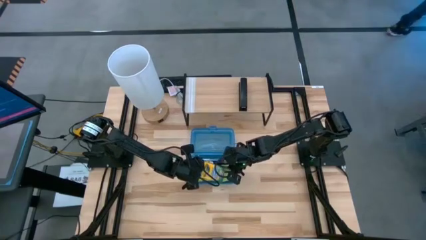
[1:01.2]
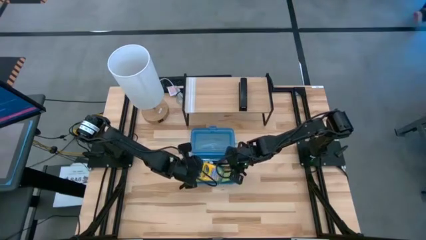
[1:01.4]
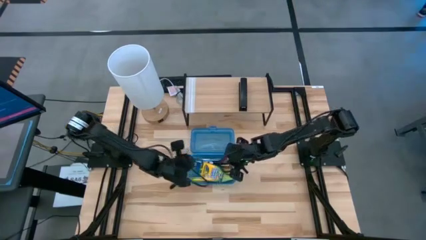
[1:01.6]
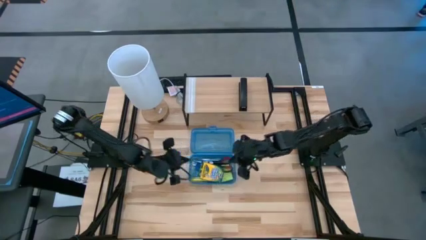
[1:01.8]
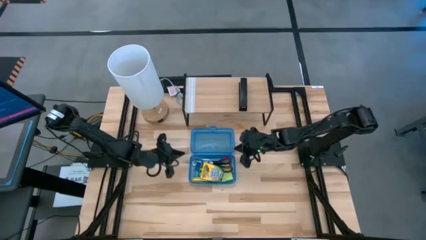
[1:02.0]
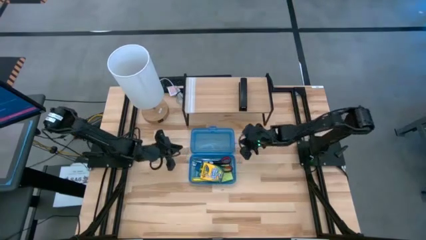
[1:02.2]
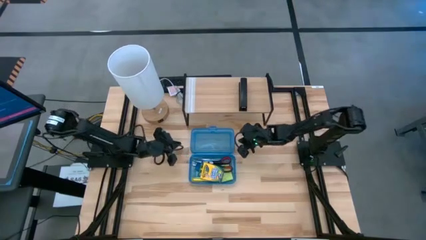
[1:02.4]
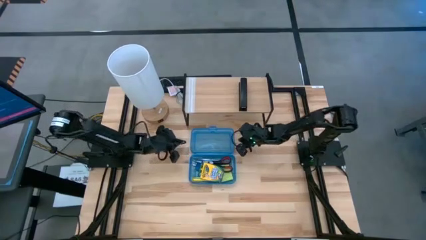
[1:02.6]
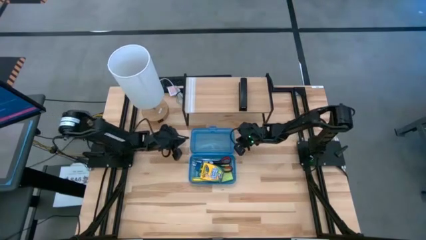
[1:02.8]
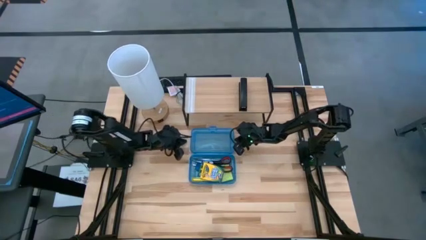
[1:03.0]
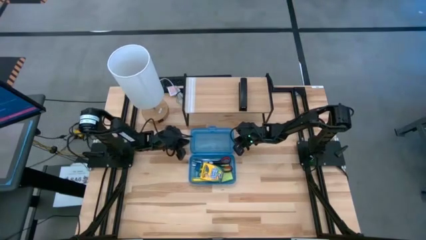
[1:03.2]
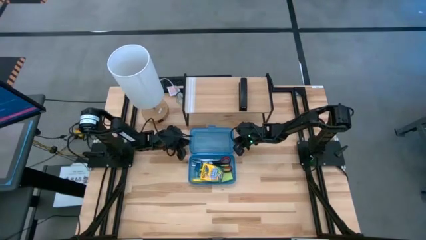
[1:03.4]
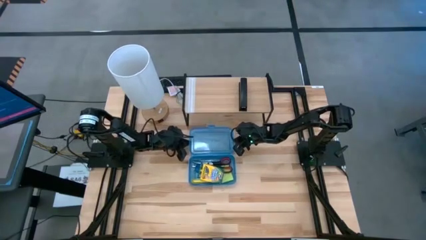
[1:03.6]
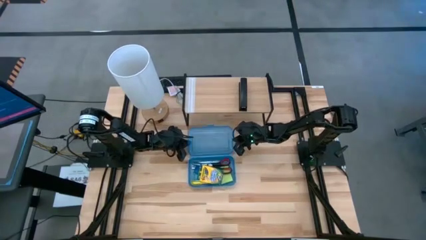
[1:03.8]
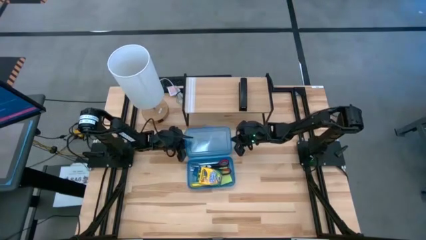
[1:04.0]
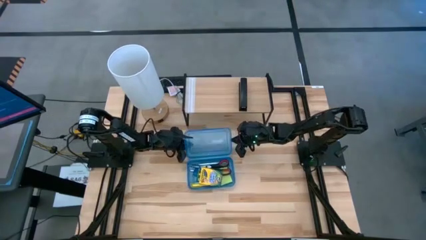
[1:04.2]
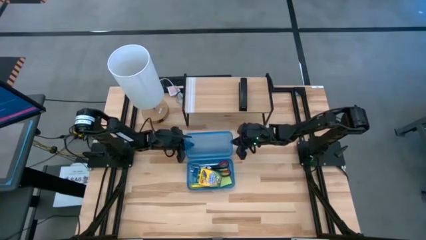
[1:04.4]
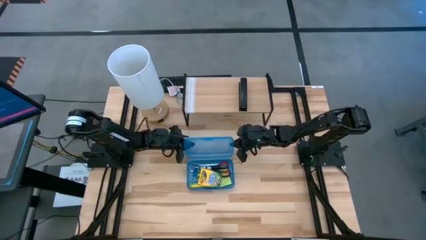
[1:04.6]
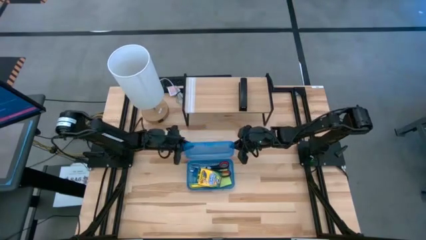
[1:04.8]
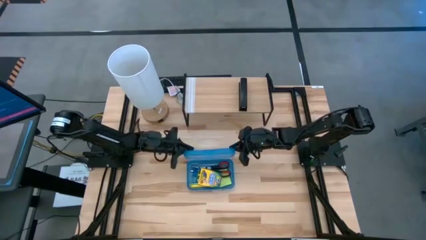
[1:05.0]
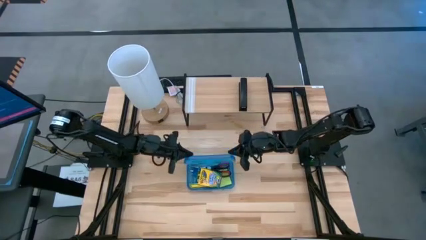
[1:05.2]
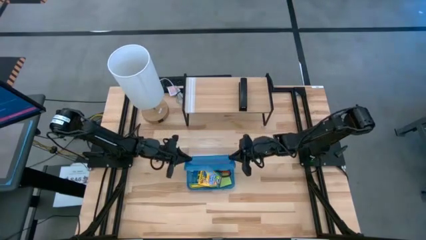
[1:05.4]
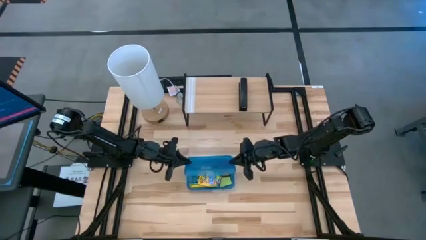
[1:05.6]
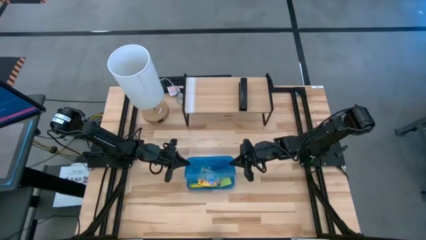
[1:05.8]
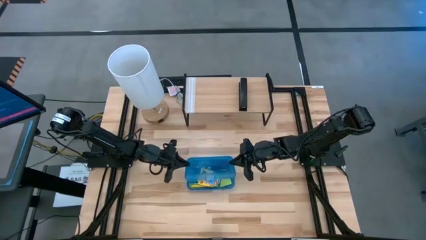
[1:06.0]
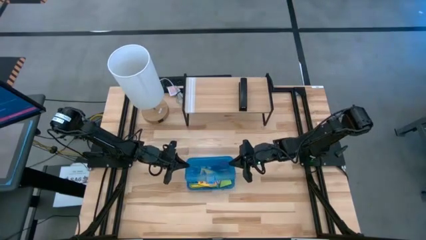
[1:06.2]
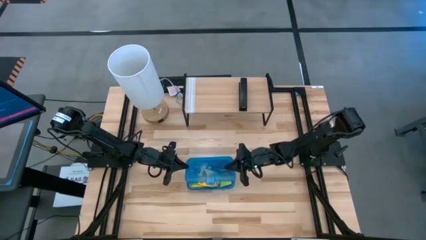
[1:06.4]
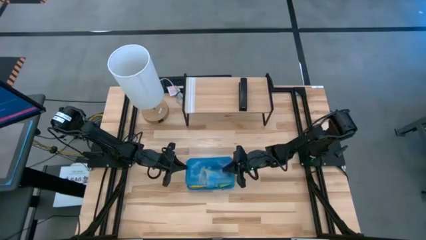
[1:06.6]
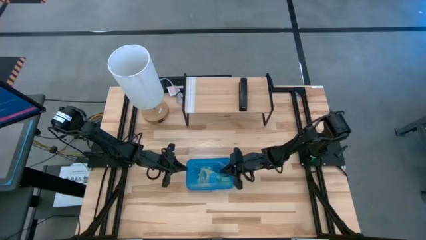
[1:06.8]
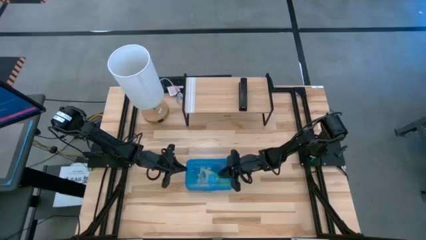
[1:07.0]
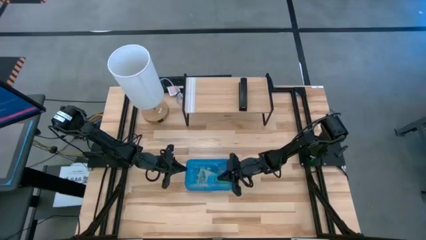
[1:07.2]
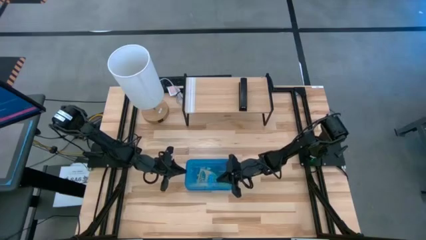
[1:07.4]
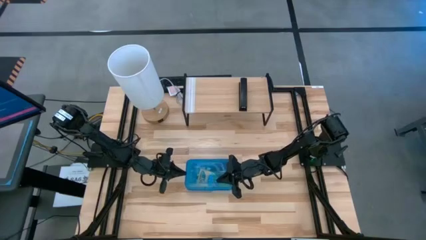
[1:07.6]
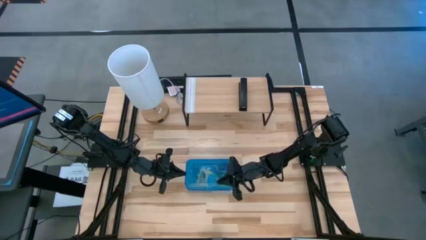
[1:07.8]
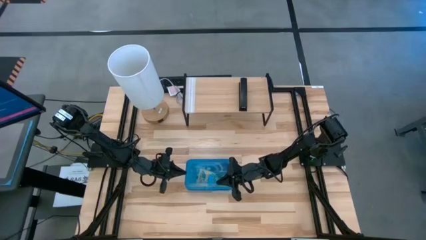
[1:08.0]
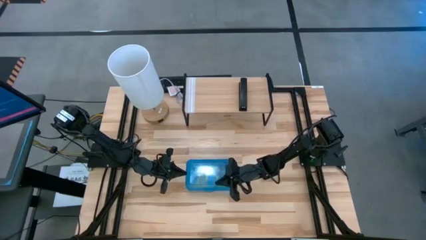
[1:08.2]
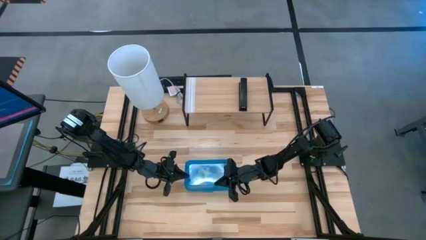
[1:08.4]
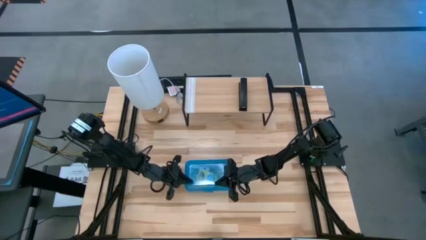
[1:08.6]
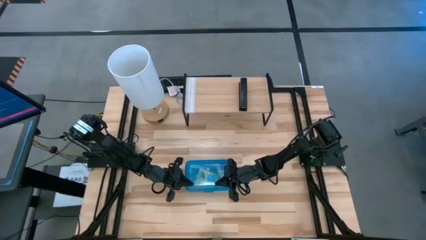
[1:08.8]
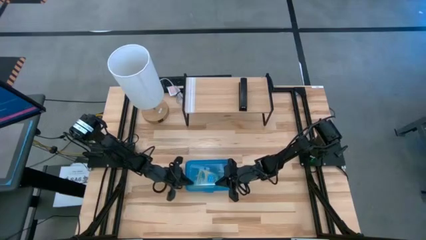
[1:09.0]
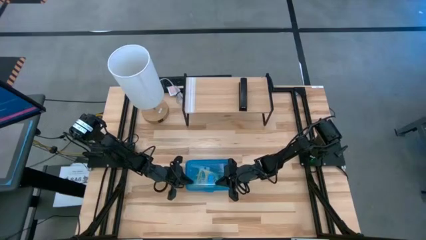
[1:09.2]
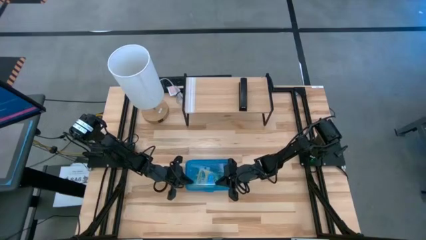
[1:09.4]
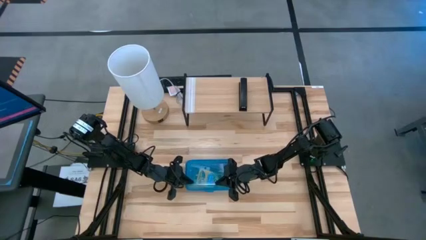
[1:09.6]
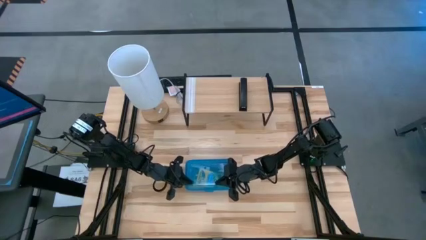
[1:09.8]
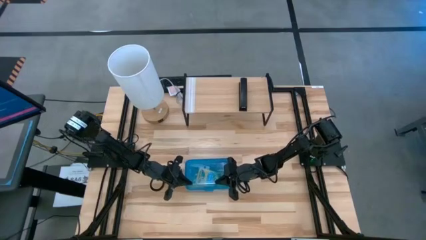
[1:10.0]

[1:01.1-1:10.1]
Task: Pack school essentials
Close the blue supply box

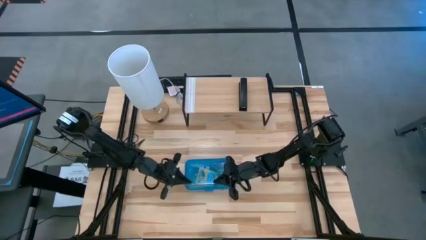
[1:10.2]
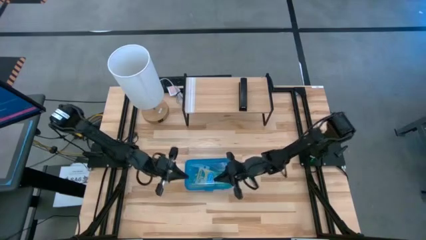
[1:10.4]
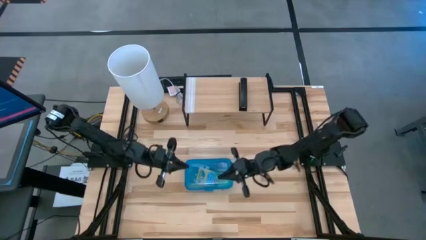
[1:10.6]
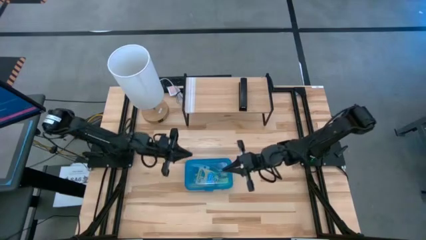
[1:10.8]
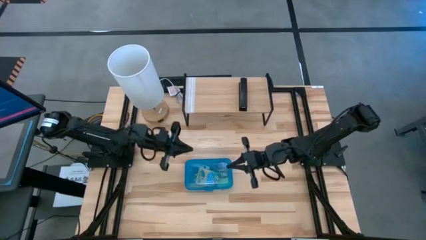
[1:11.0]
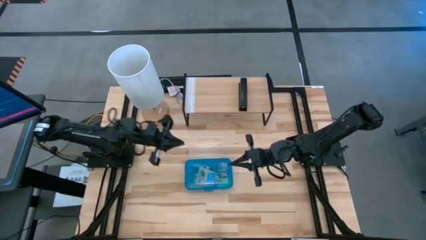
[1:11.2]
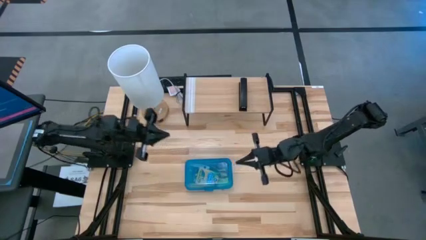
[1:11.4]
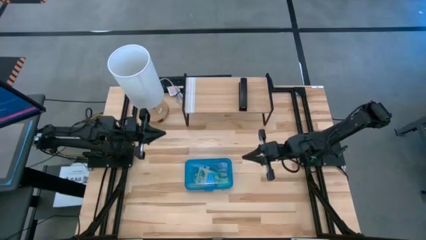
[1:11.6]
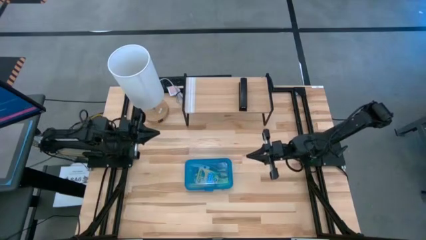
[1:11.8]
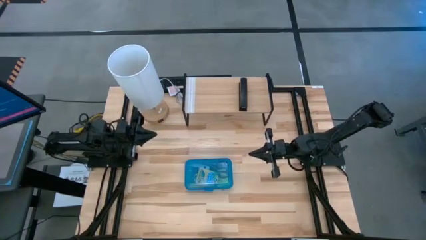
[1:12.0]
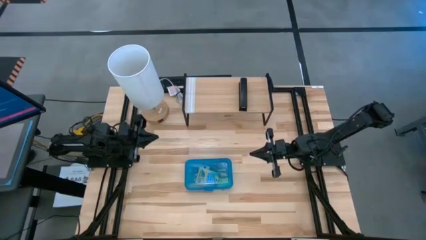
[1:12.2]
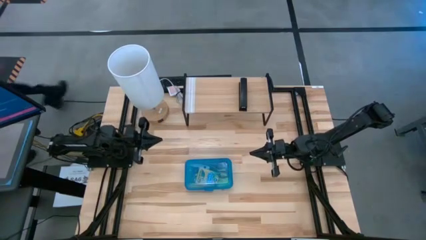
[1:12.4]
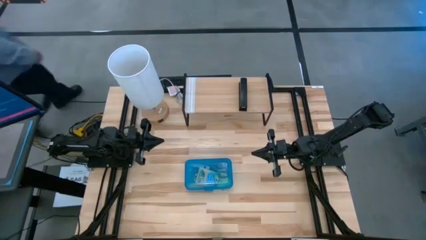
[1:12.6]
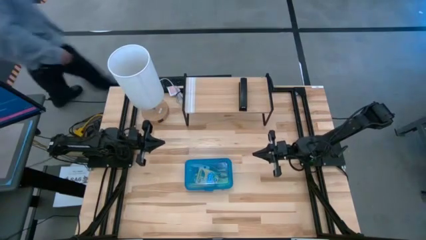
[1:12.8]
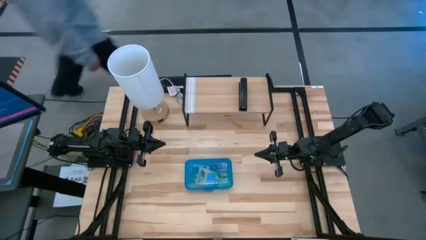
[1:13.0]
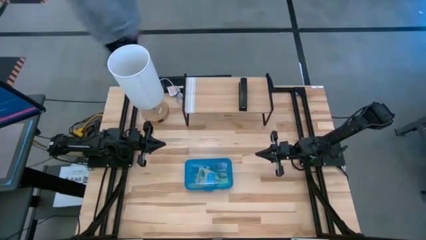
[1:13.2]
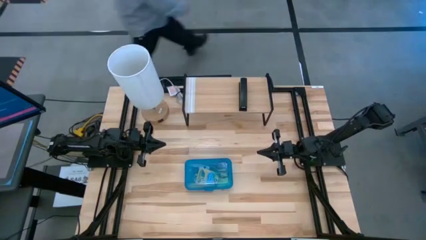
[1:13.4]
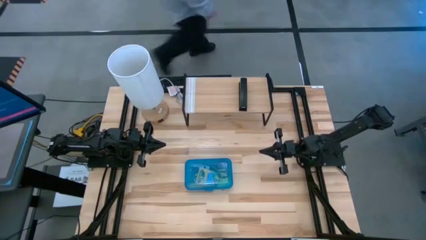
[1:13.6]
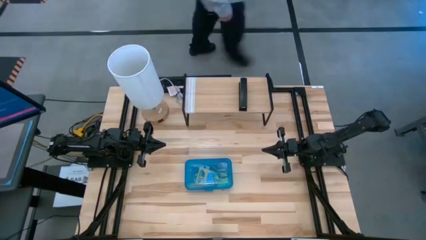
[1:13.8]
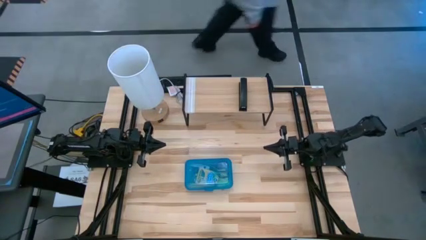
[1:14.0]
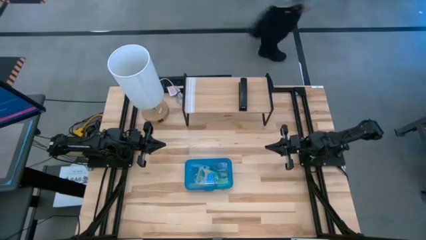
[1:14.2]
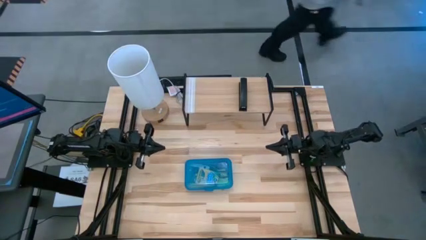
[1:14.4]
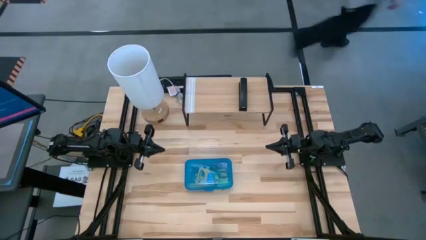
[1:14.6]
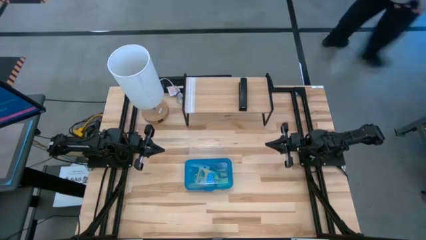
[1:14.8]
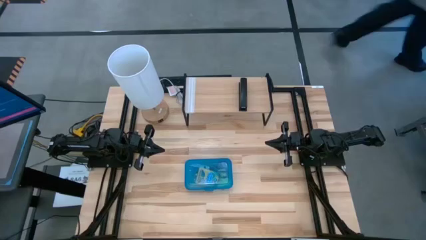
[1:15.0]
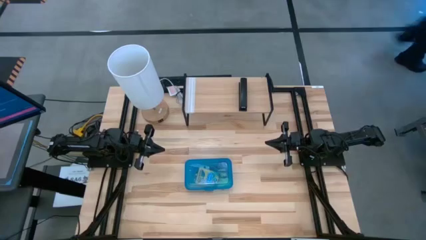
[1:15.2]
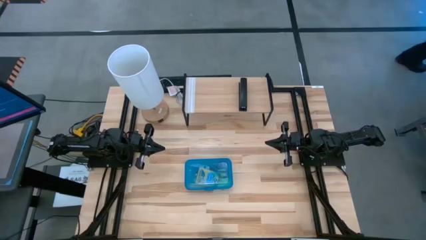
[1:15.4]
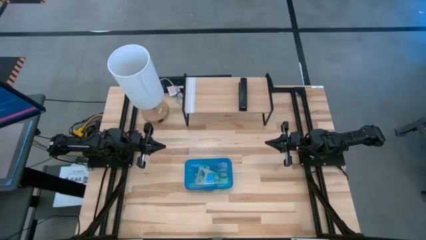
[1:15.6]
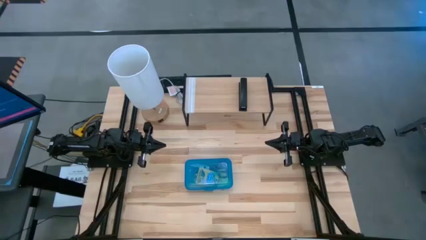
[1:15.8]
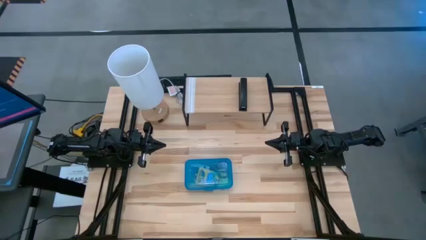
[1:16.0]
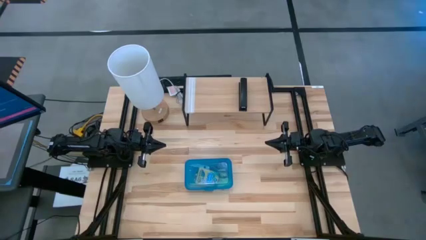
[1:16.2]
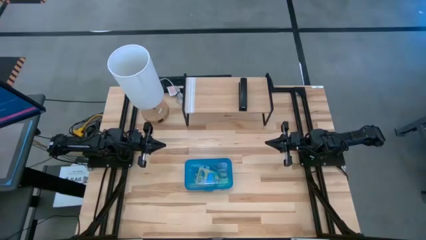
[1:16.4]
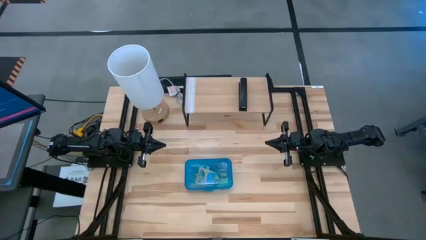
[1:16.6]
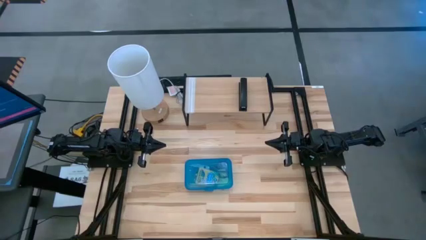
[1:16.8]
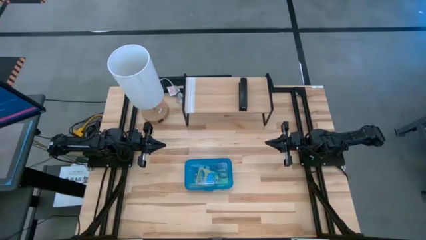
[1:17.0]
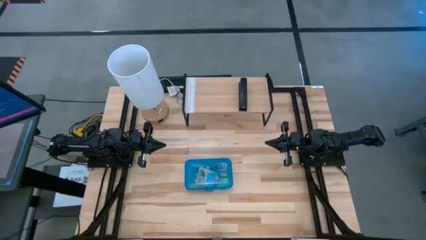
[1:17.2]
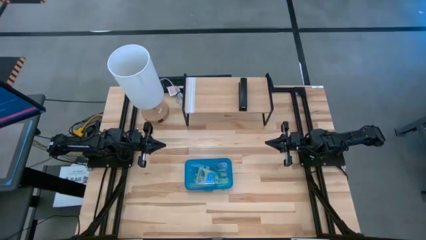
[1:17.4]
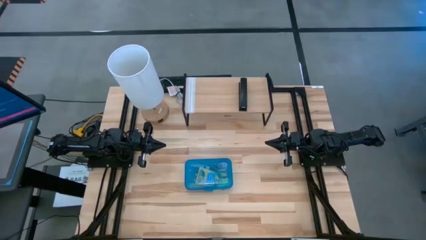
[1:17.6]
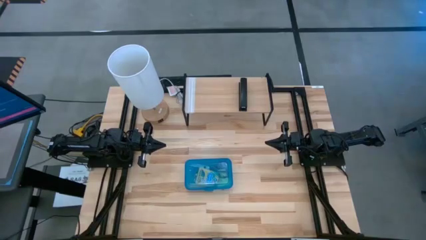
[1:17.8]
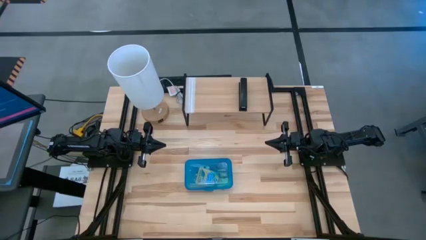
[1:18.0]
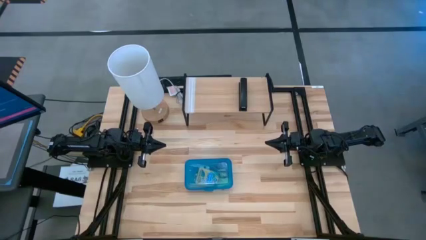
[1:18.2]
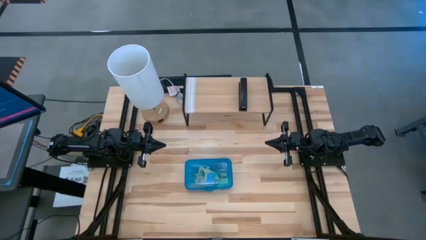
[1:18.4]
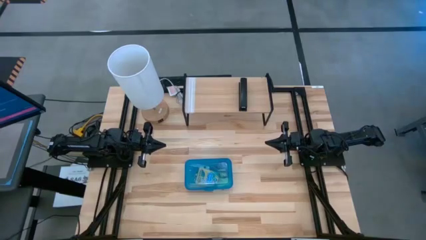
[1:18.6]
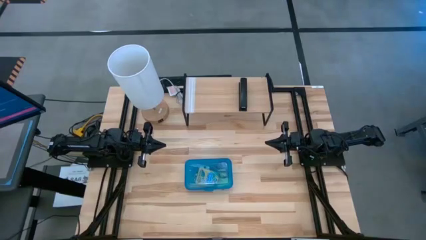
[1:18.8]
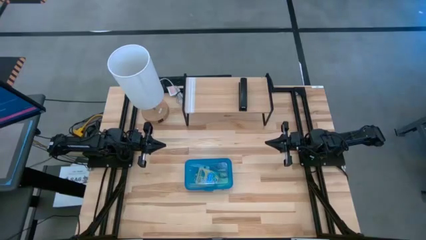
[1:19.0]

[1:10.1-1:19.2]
Return to Home Position
